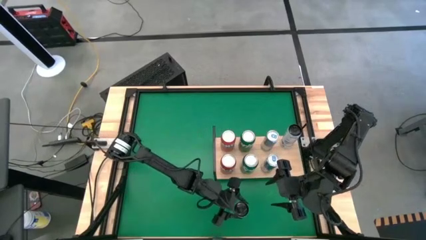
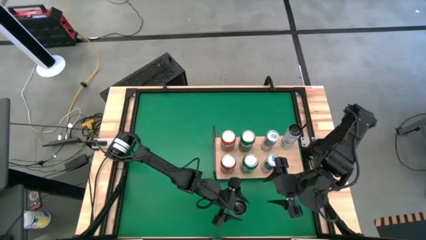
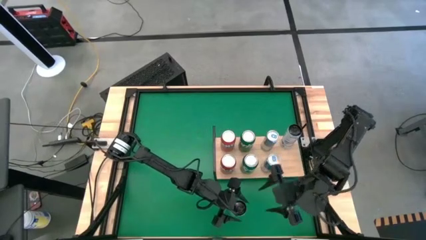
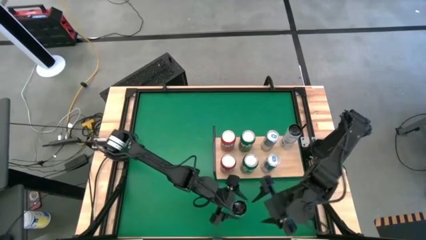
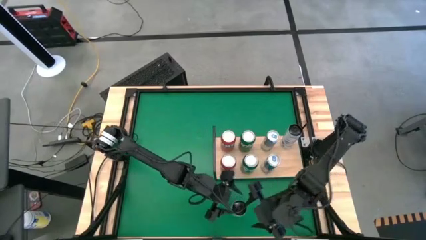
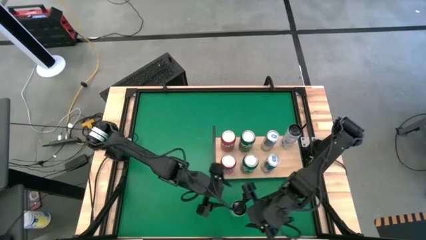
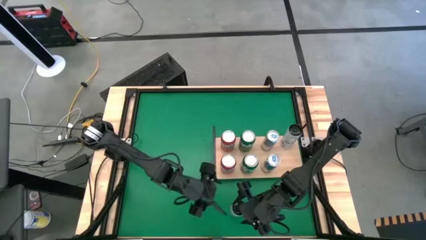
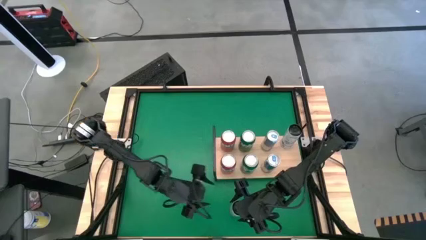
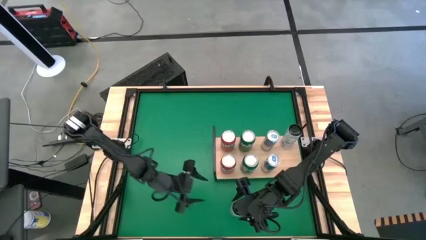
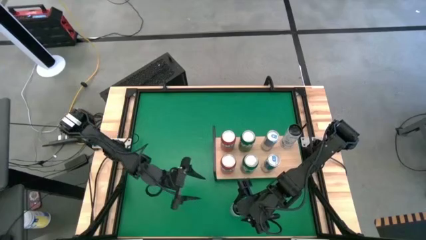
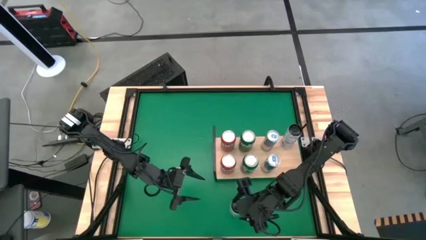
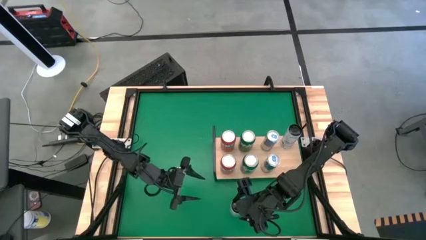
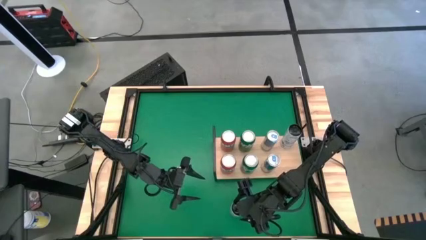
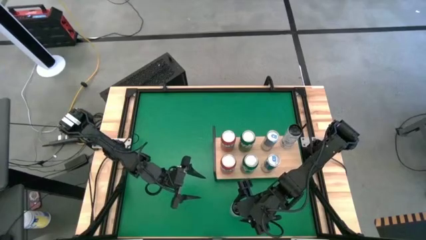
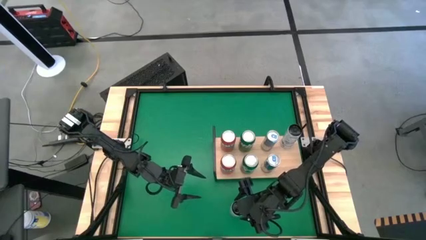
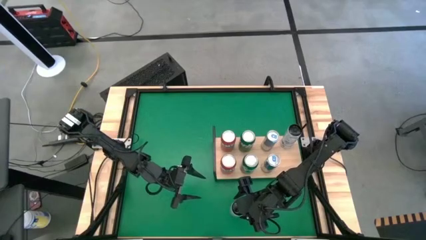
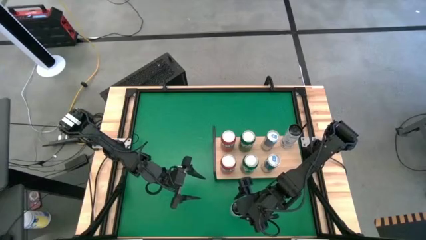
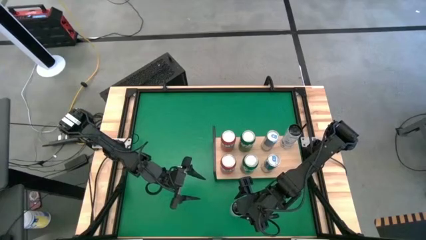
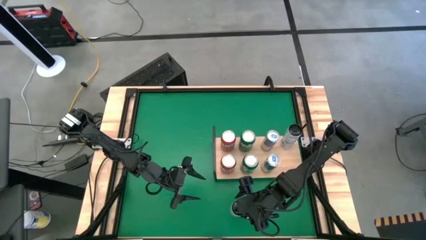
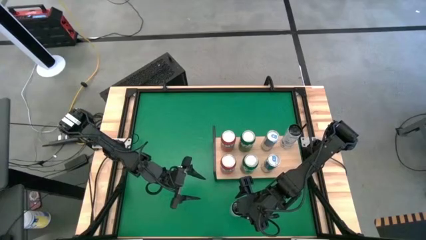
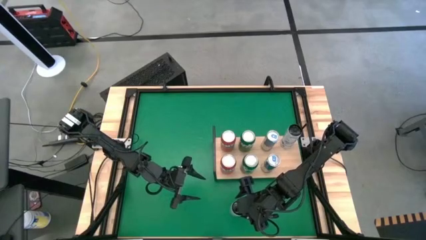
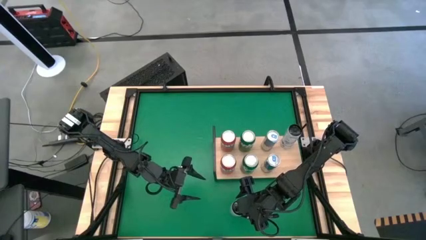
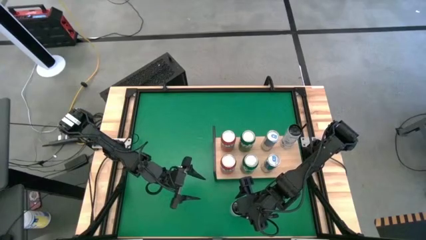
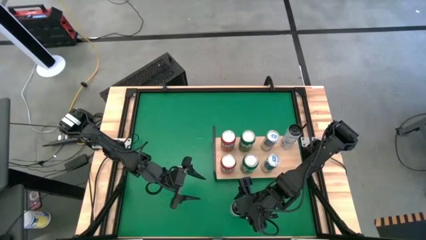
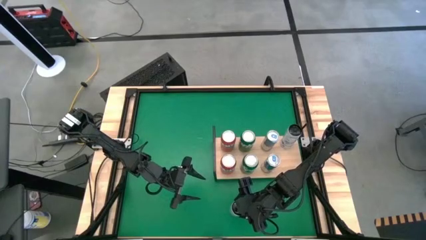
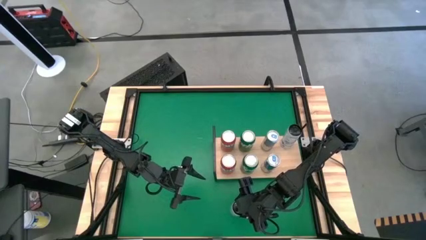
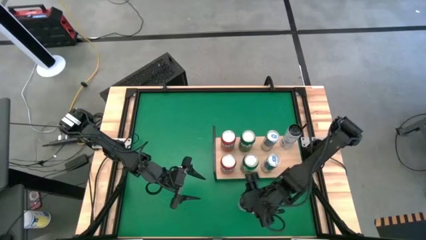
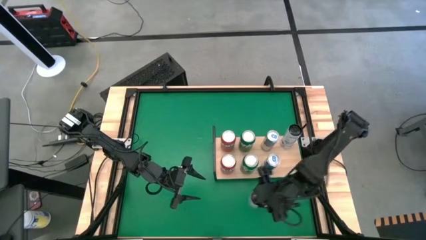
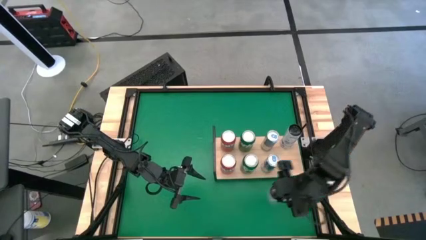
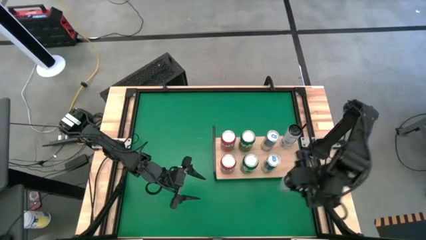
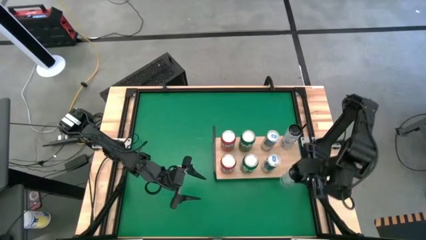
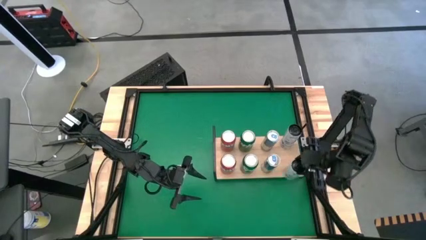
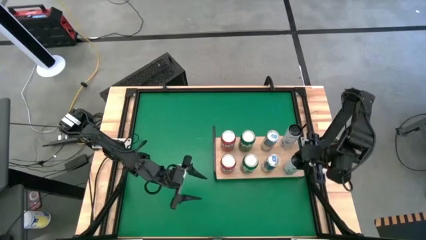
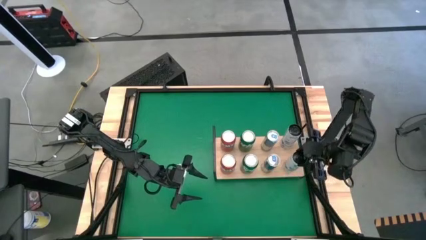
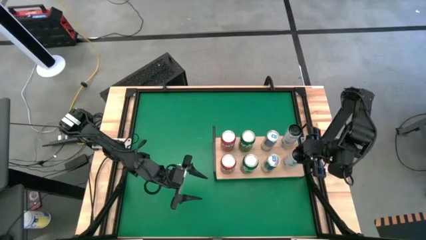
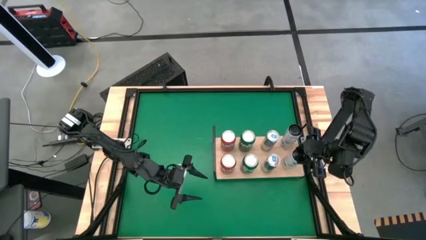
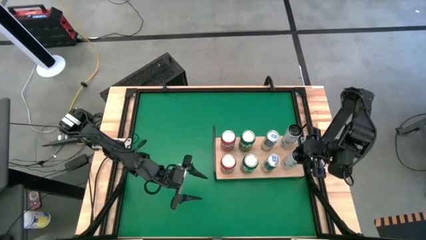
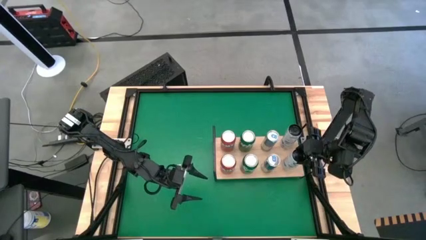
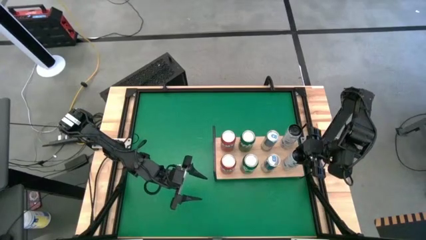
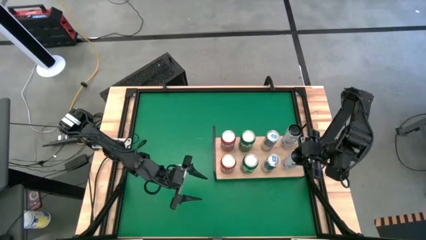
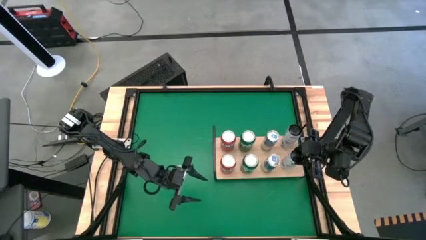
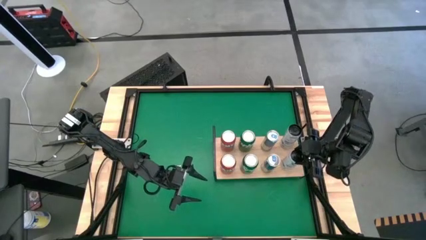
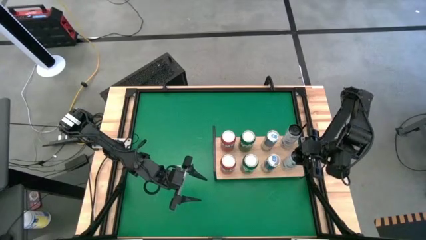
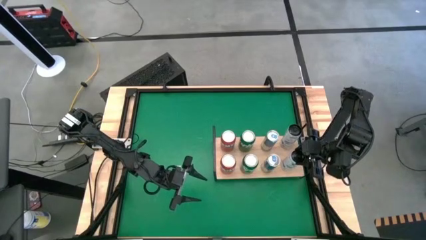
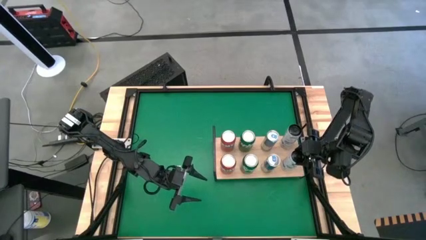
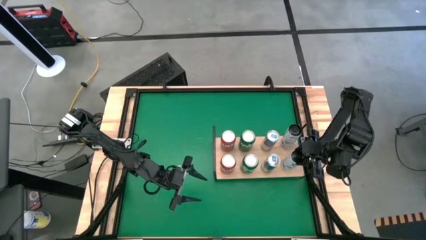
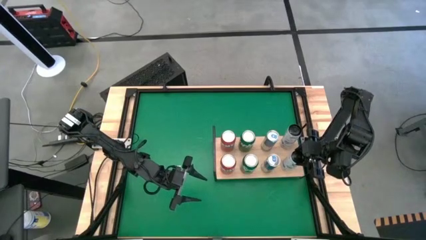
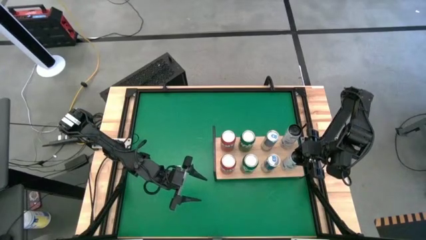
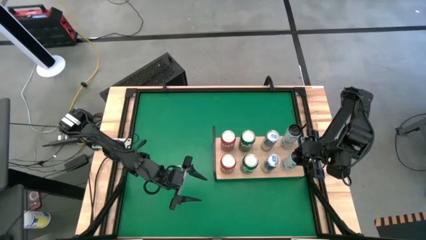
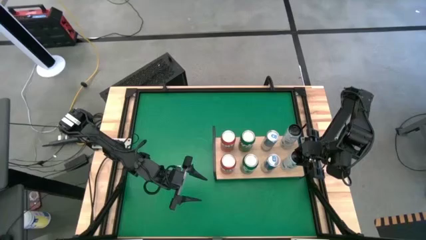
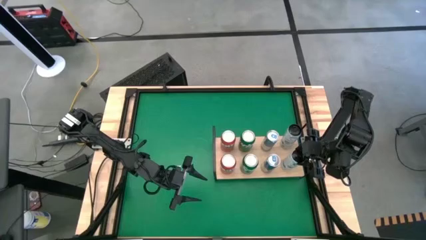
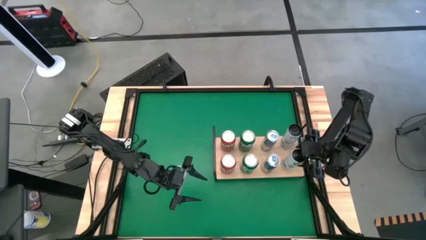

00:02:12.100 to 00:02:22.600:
Task: Place canned beverage on shelf
Put the white soda can on the shelf

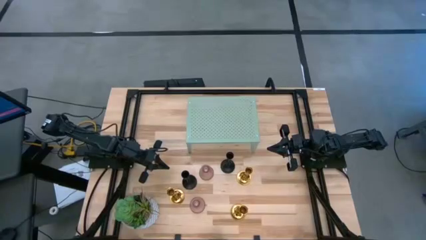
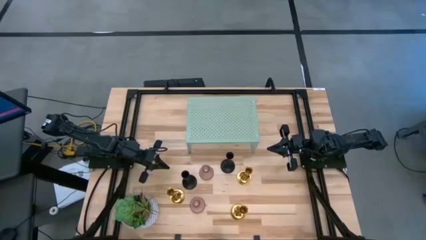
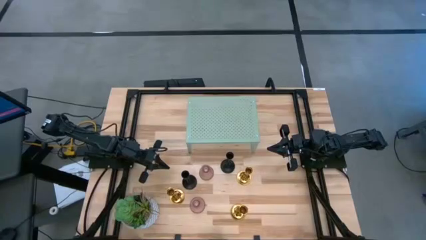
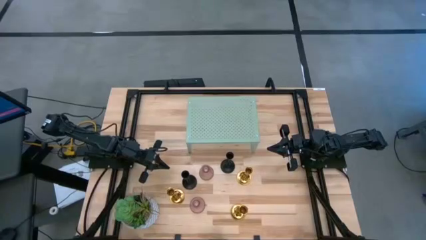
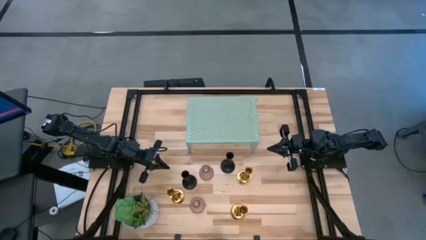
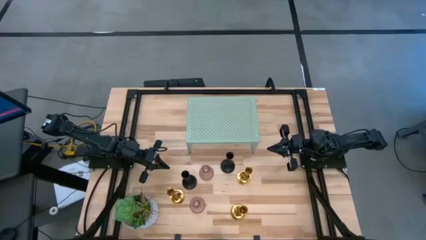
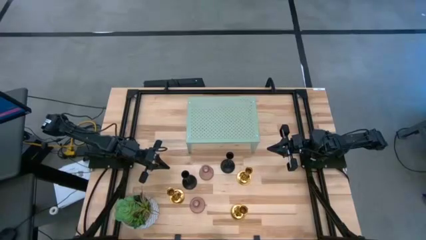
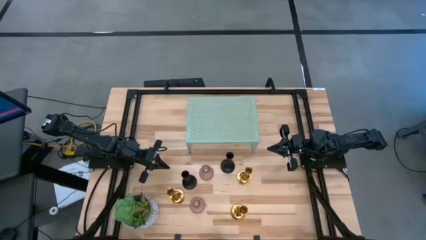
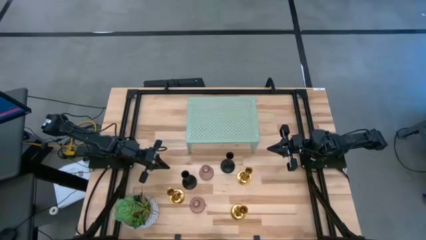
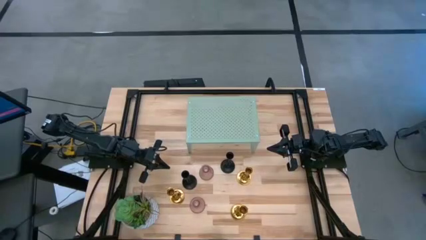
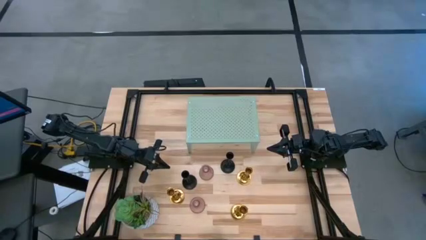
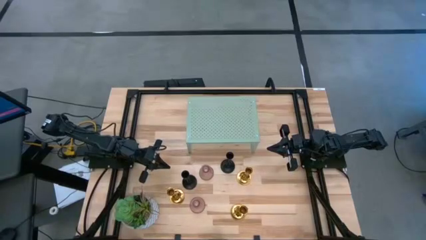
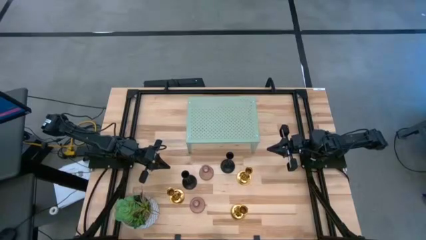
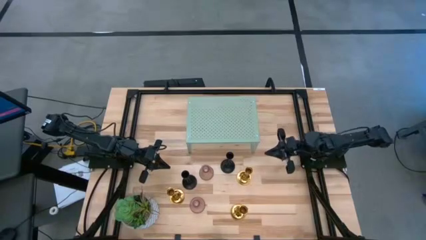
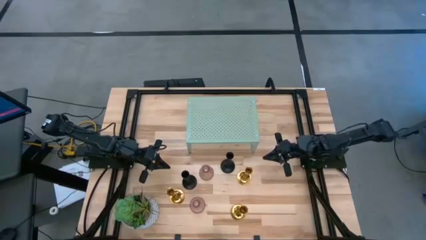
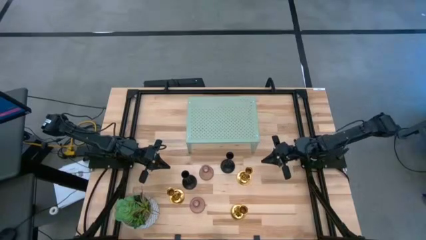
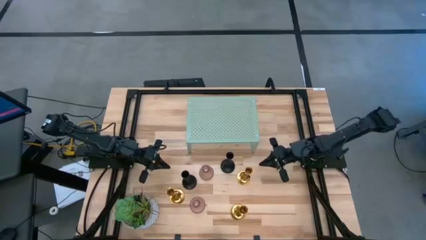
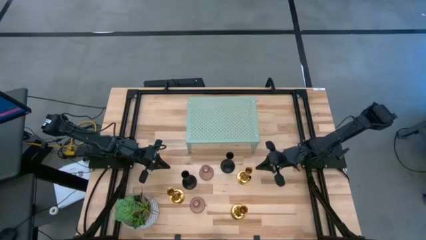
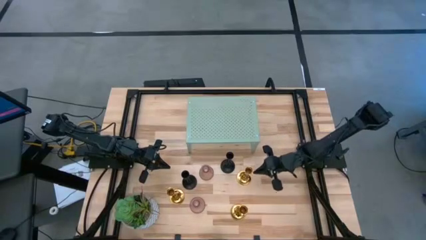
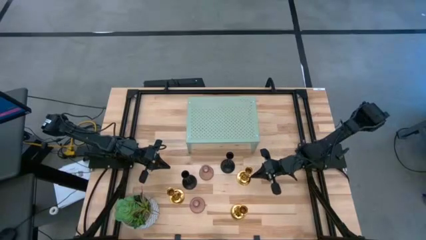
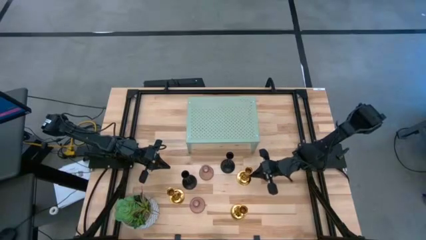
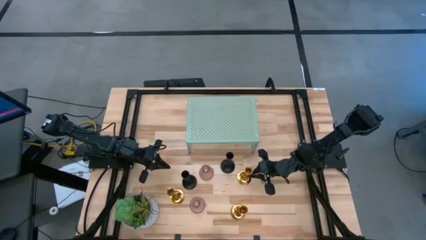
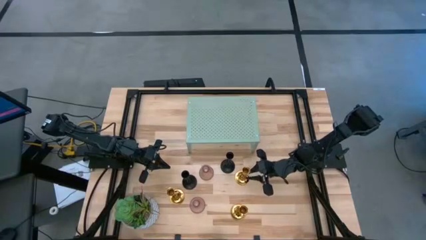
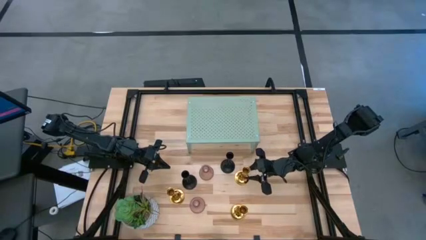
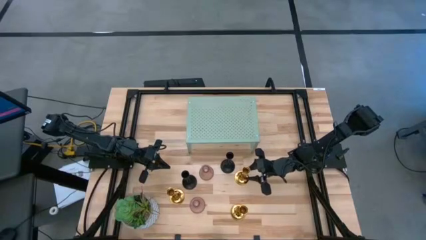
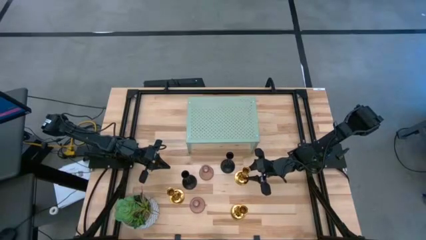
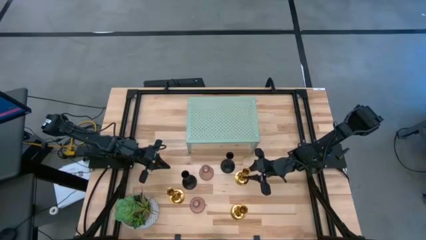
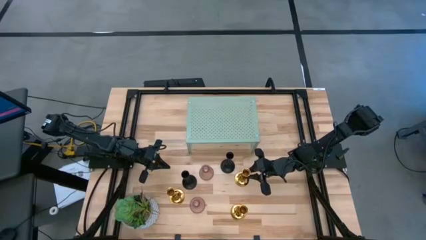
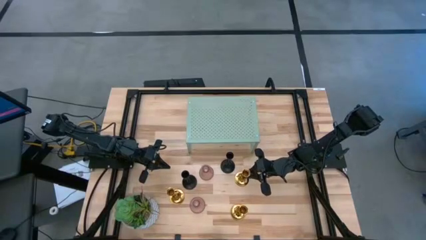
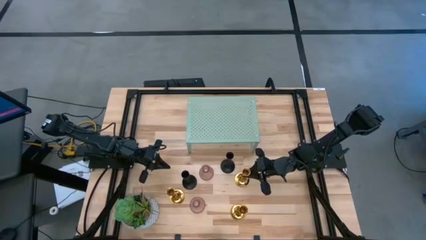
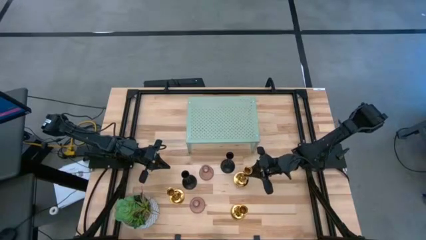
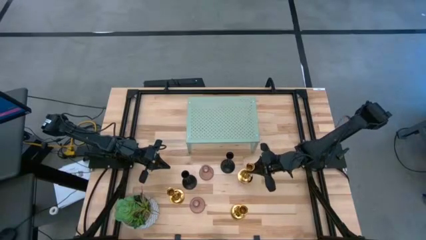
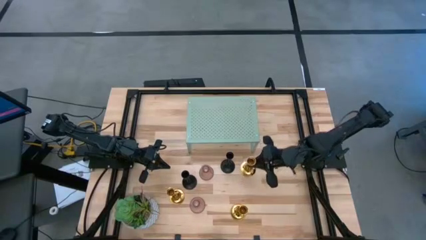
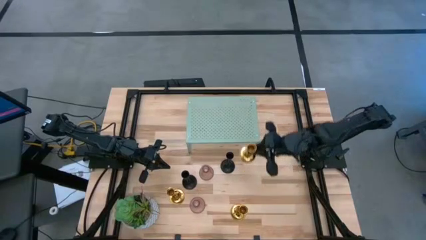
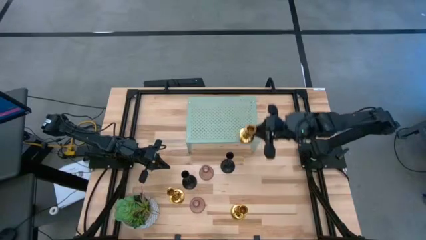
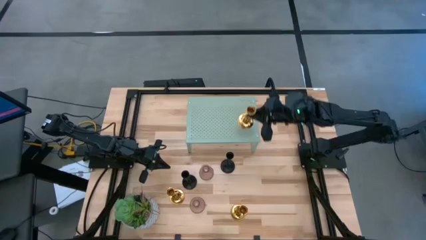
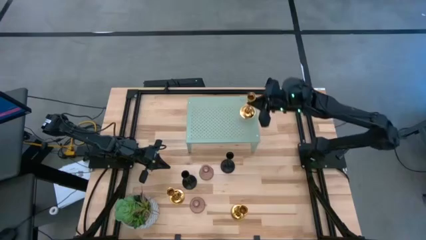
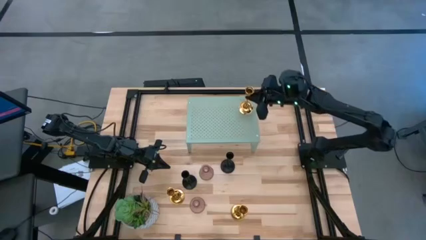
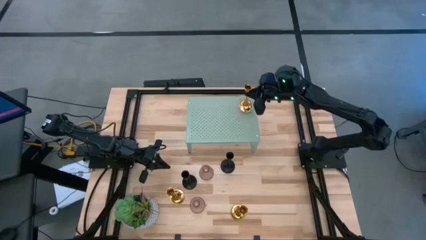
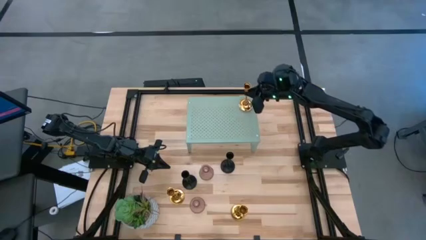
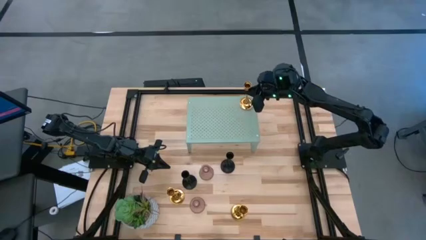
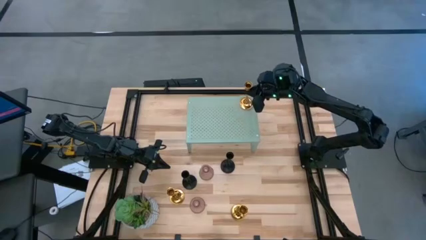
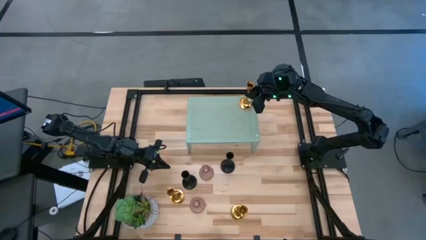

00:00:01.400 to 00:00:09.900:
Task: Pick & Place candle stick holders
Put the top gold candle holder on the shelf
